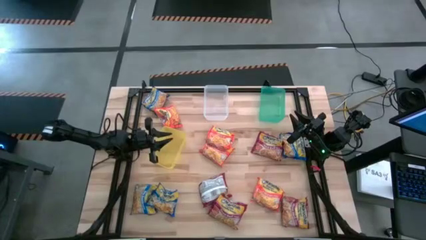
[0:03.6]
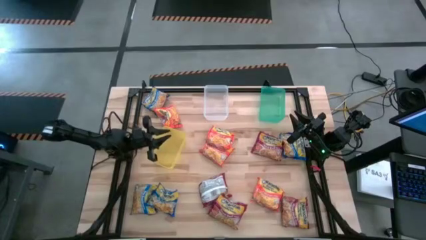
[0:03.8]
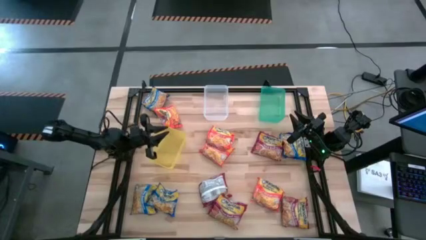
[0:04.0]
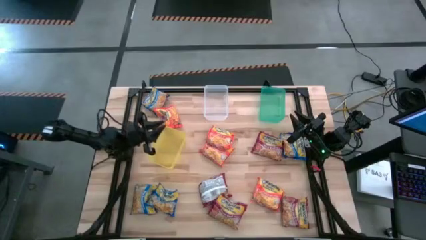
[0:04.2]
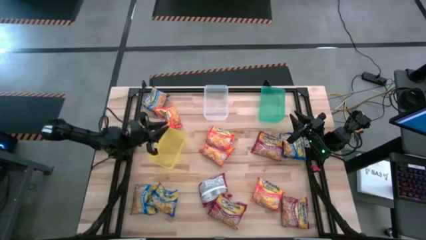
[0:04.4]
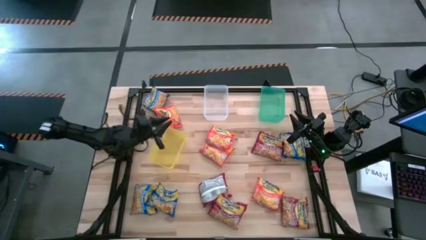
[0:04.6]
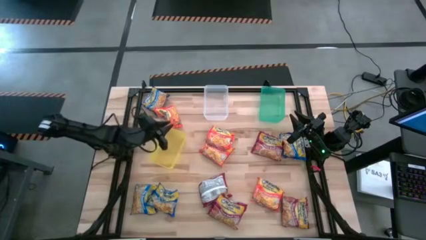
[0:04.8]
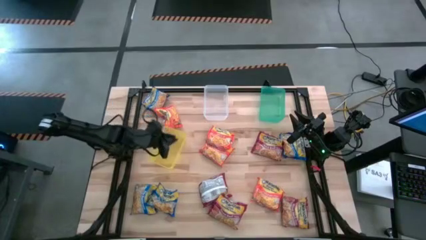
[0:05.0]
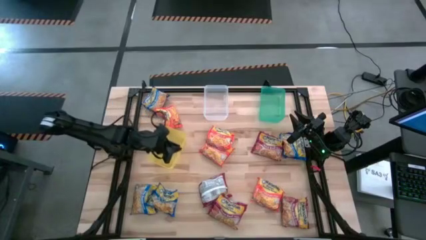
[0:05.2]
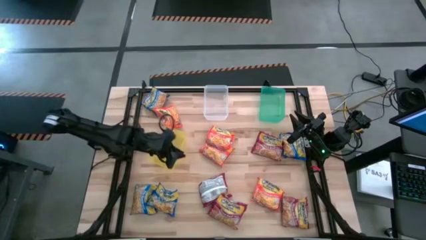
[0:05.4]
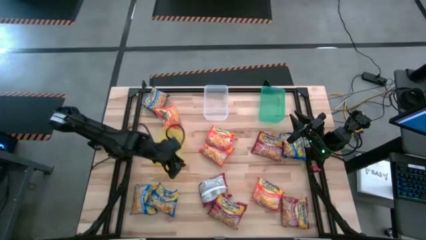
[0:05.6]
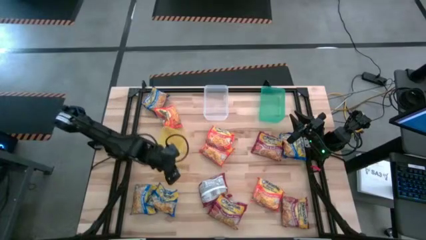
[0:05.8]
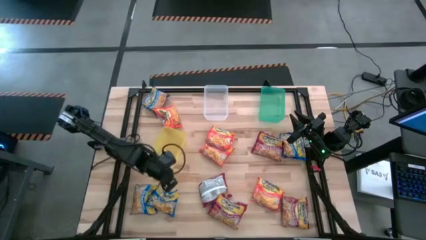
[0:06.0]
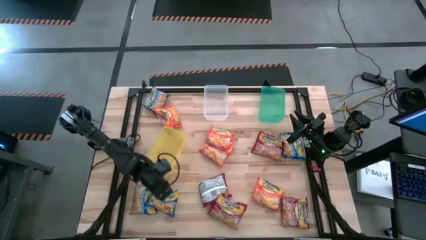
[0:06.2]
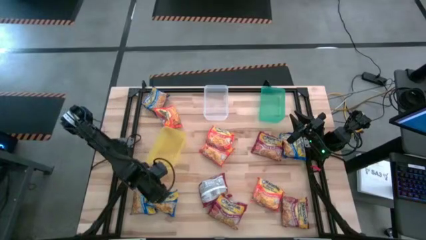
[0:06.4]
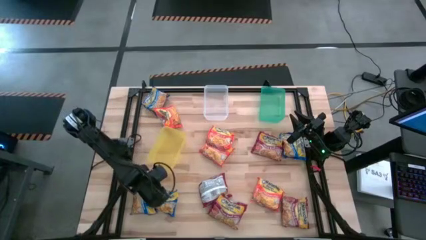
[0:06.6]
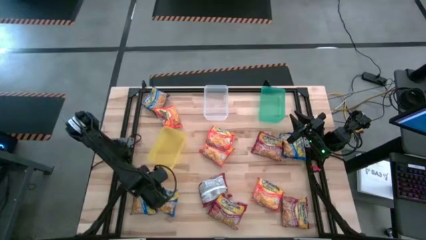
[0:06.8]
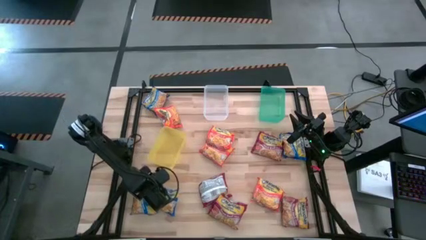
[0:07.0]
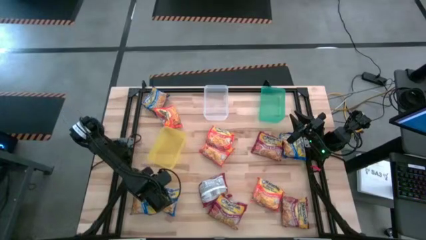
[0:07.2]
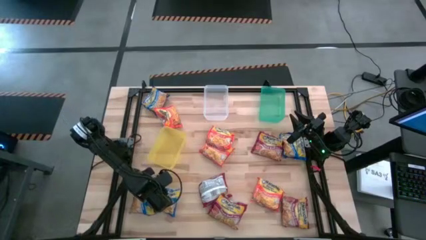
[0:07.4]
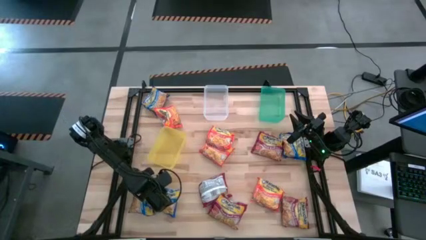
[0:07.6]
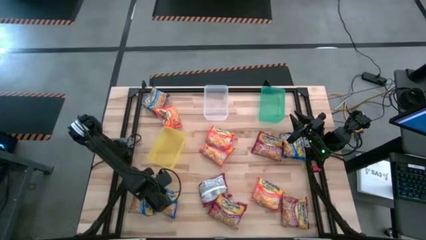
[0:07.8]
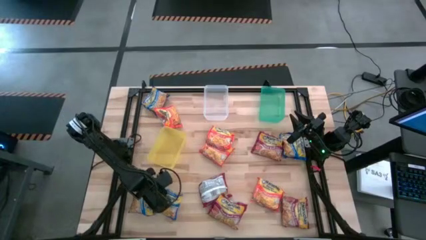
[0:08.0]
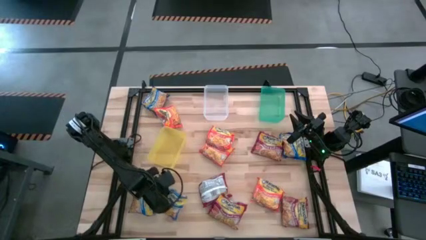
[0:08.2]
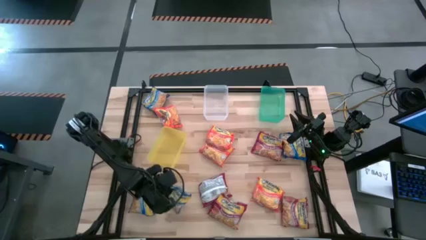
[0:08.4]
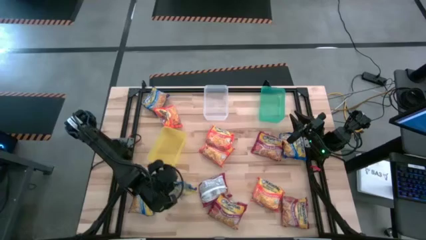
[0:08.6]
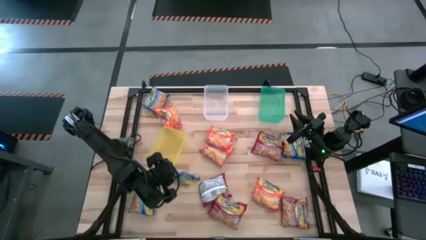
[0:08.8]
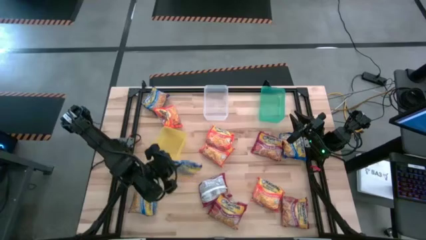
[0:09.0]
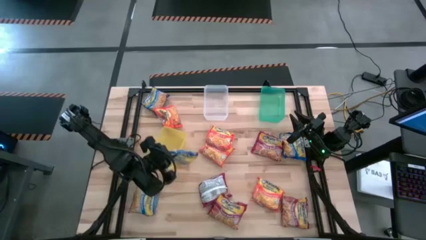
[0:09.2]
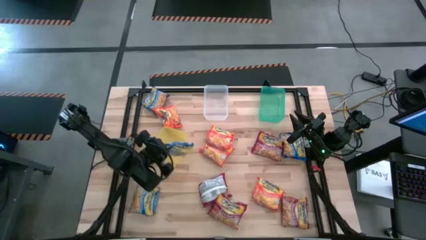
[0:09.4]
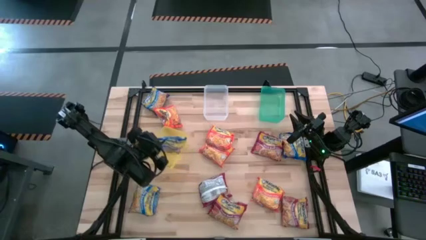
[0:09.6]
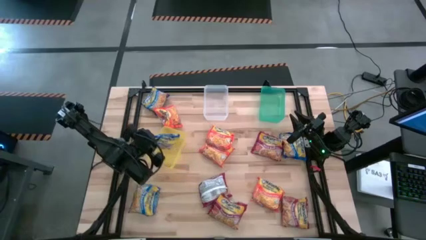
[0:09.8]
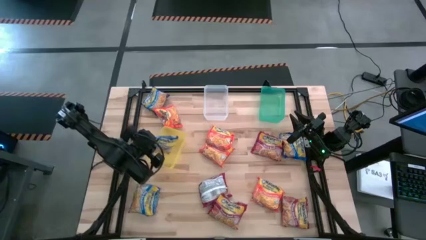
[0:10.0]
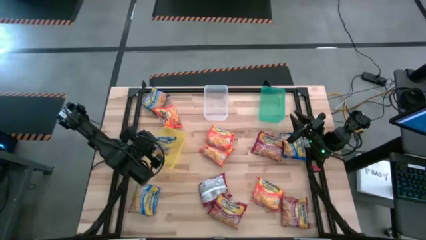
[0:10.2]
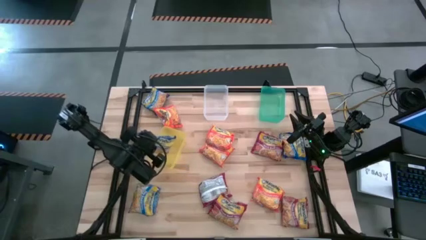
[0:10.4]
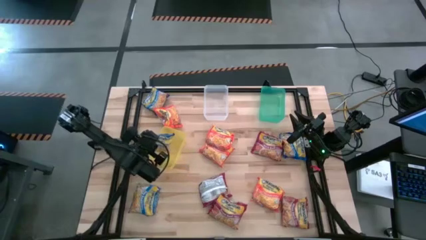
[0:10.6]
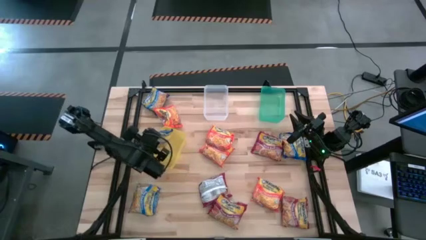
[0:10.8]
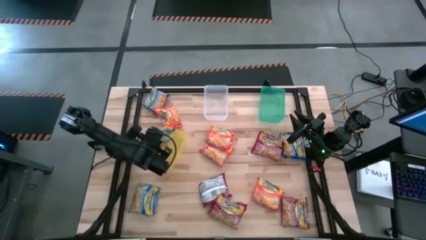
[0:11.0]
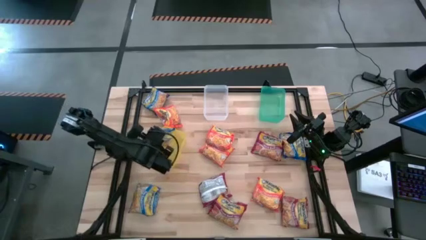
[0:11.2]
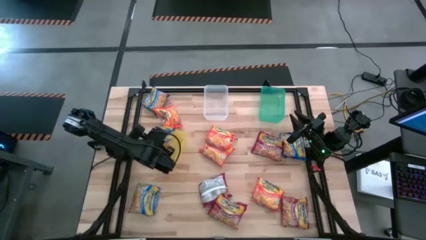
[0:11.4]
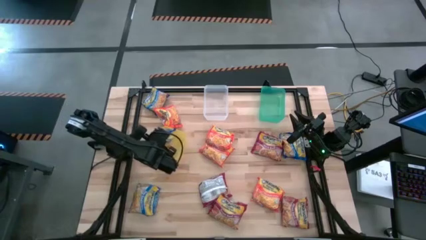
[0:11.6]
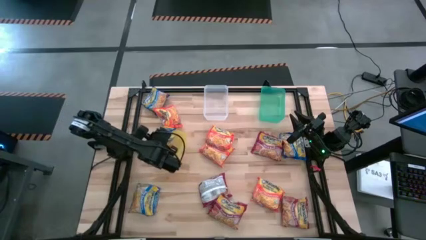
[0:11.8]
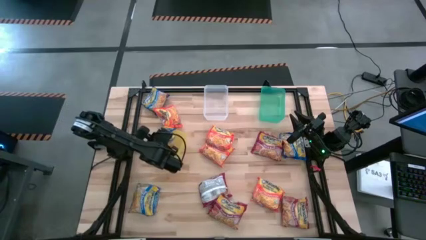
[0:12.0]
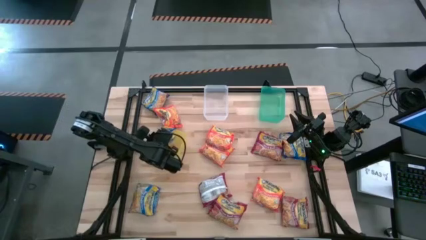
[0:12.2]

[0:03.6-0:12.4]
Task: Sort Maruchan noodles
Put the blue noodle pack into the yellow bin

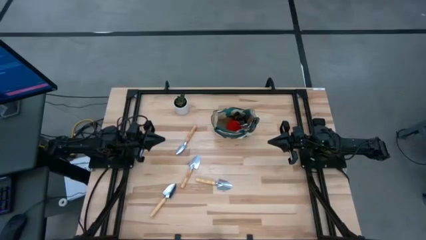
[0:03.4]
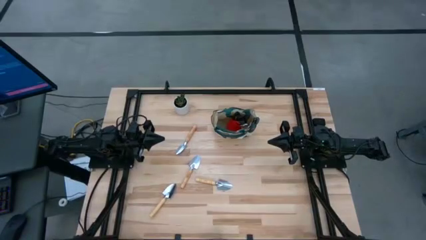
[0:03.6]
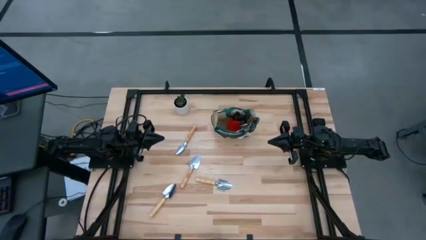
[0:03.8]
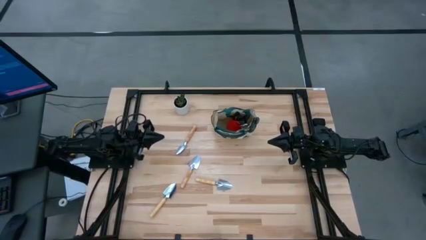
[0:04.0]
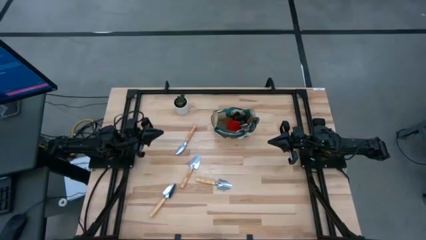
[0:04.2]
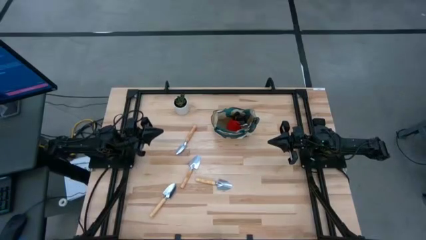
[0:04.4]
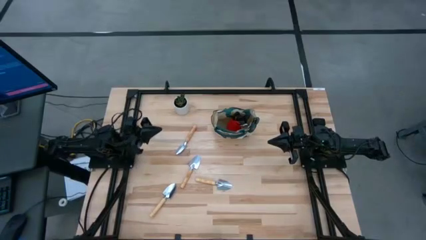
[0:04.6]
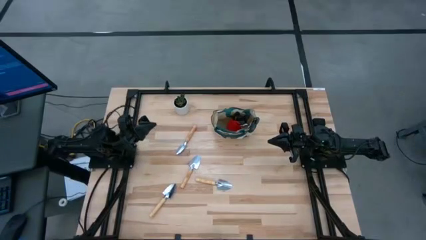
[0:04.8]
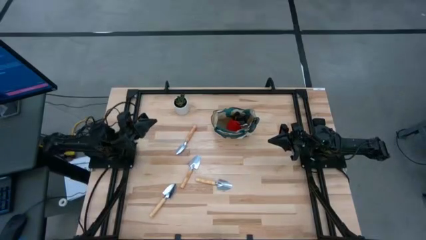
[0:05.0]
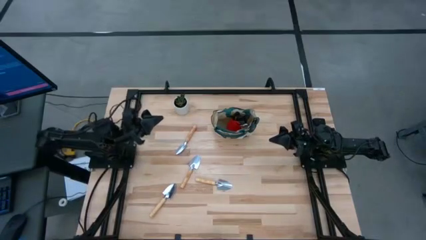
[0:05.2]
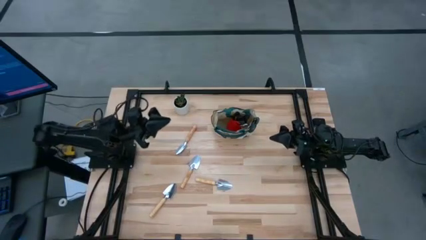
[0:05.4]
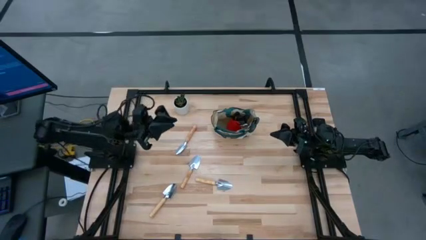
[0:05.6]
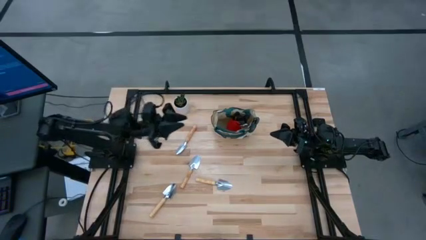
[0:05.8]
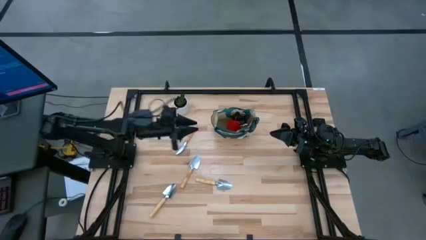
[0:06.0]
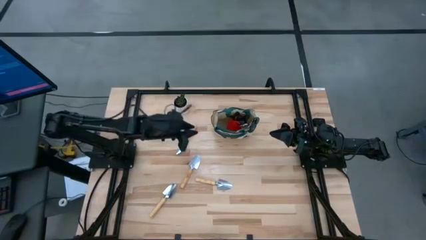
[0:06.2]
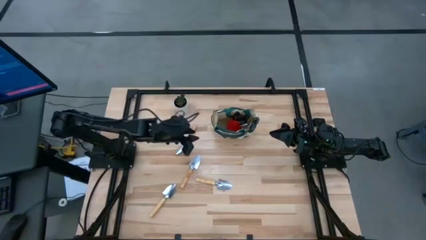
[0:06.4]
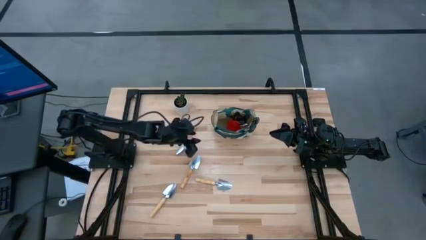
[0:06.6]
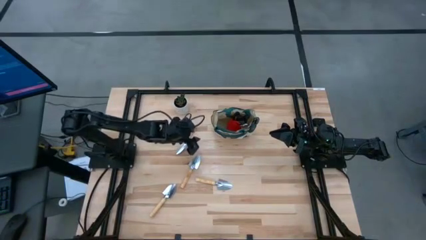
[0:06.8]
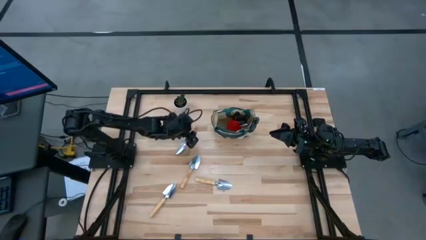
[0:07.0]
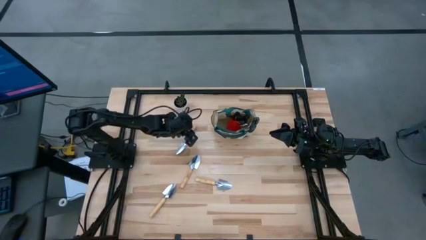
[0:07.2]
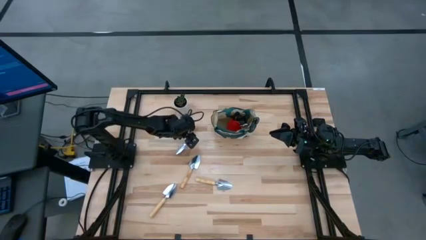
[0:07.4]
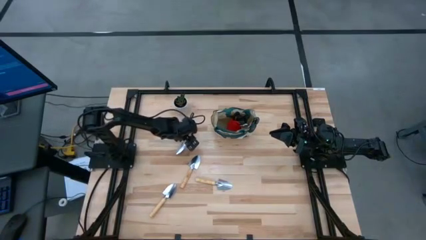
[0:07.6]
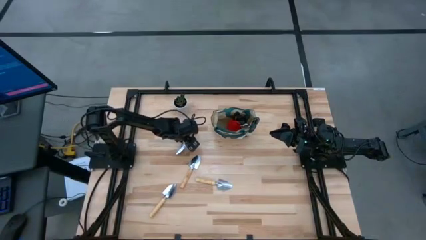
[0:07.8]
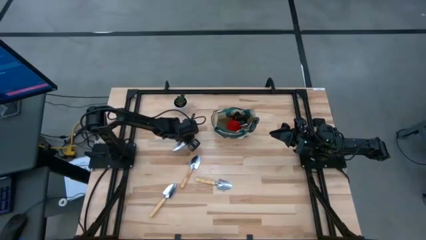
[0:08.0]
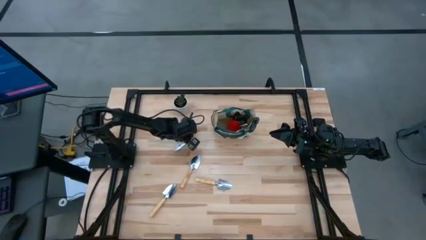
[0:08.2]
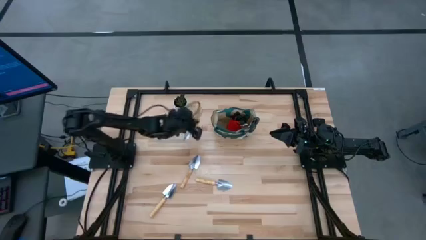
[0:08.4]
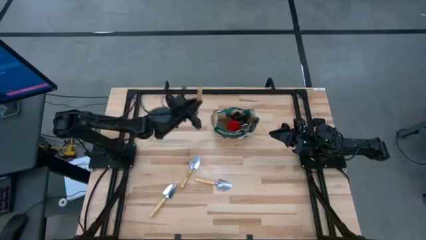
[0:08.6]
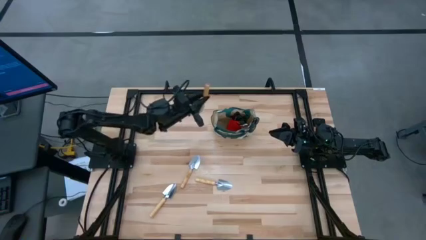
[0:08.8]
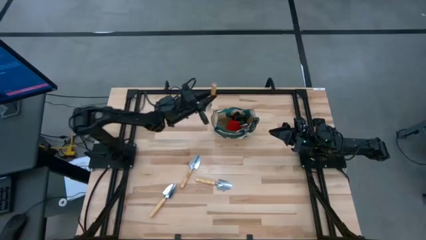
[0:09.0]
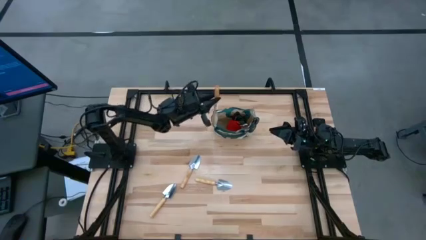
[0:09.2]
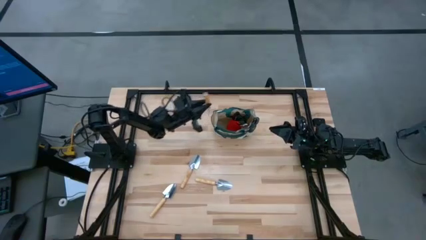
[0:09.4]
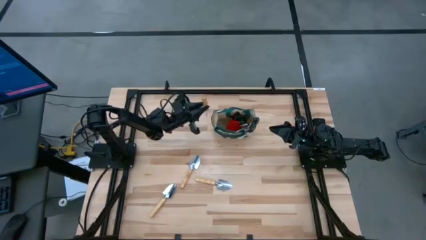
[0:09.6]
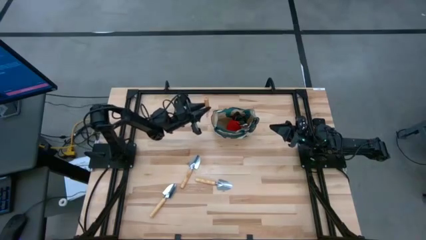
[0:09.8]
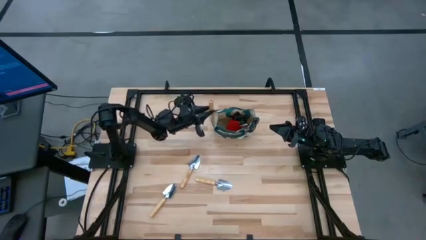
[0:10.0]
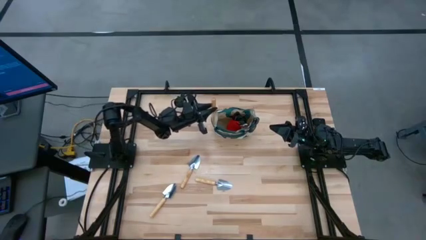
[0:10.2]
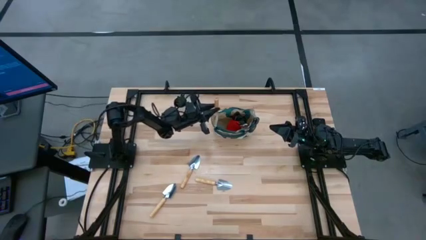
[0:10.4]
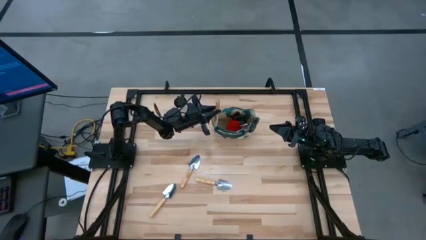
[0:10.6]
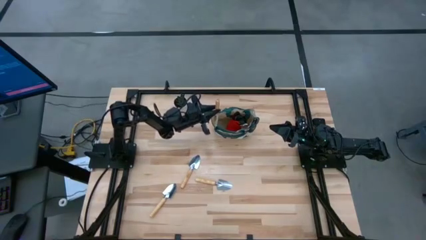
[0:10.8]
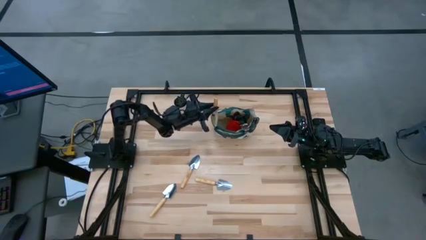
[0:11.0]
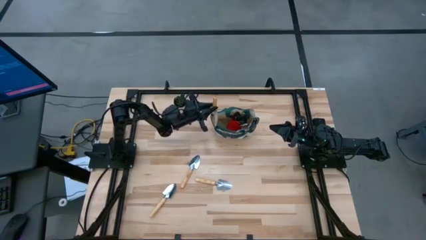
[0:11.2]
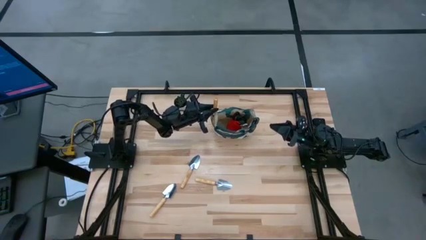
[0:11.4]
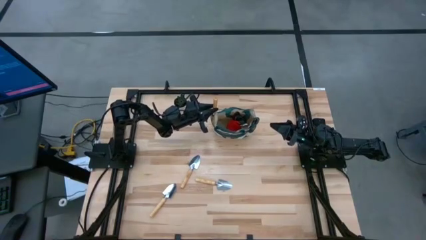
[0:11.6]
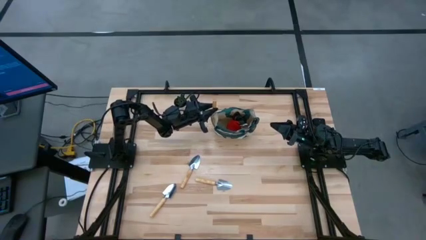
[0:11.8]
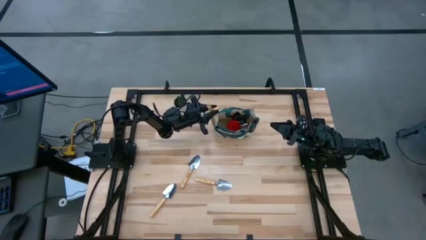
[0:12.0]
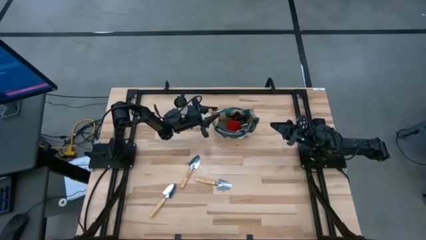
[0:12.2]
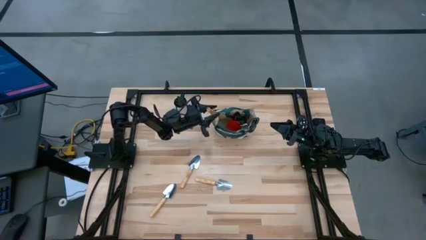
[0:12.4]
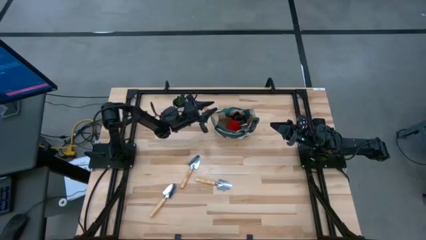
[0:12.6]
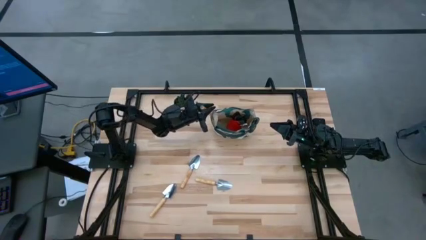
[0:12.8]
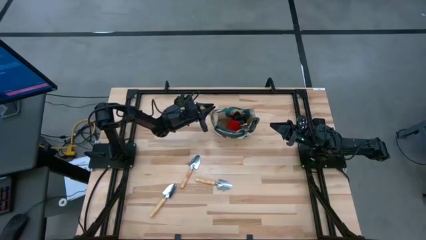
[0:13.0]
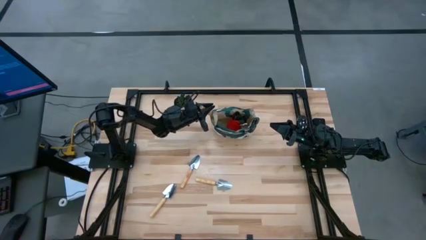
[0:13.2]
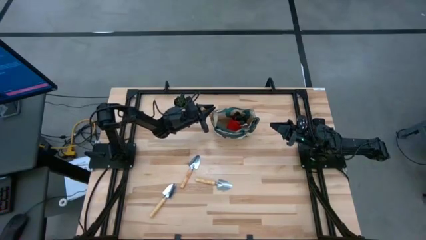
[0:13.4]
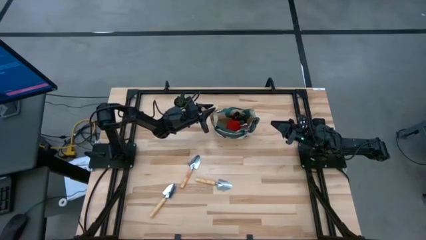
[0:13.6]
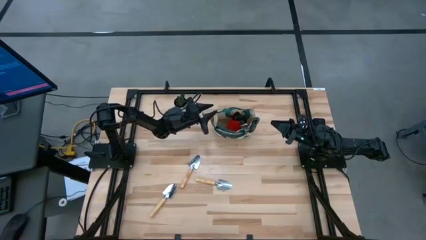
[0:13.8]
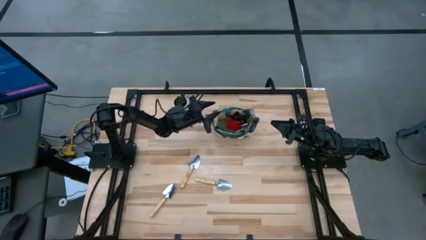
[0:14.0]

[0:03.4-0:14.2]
Task: Pick & Place Garden tools in Gardening bag
Put the brown trowel into the gardening bag
